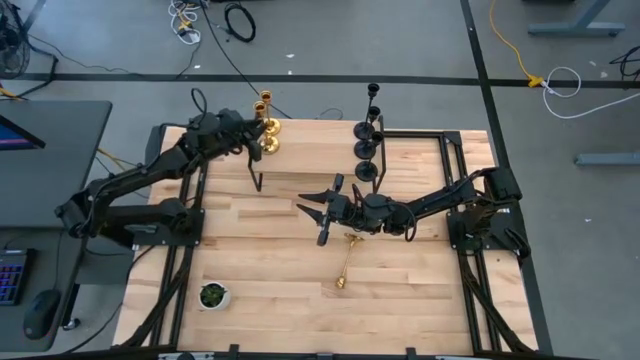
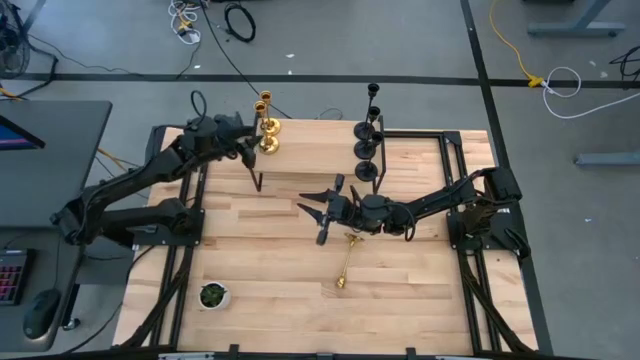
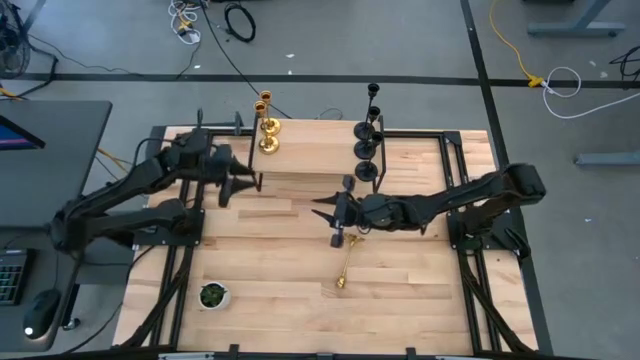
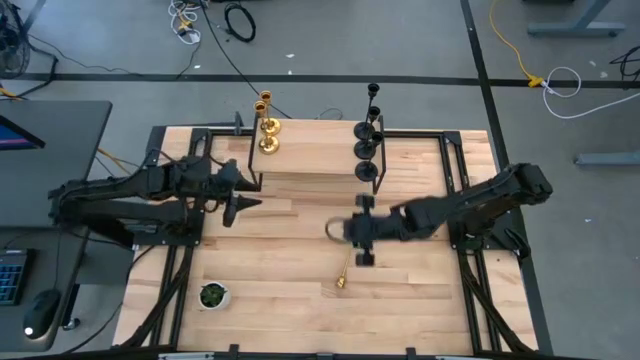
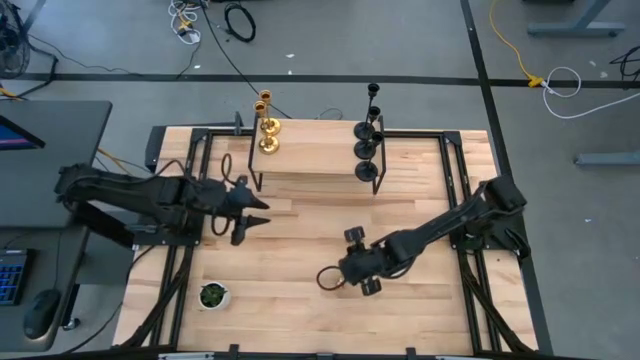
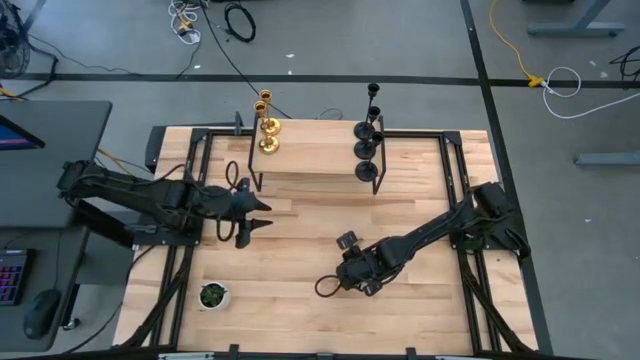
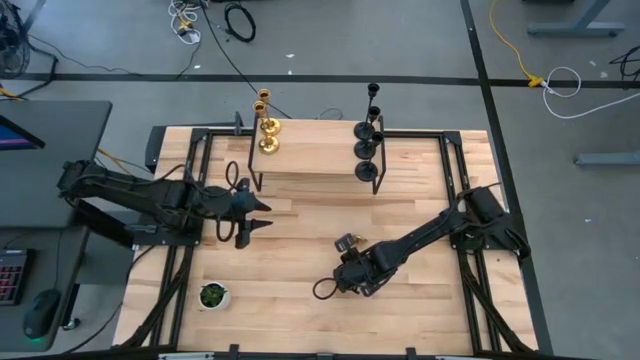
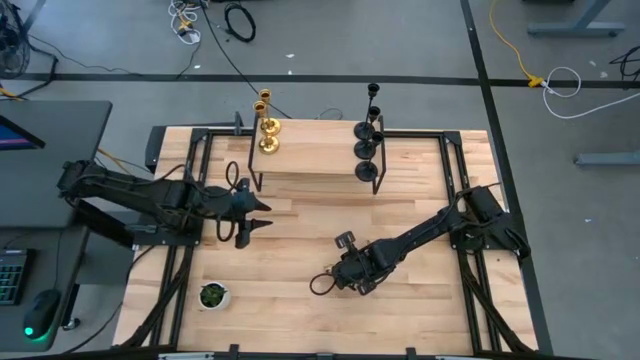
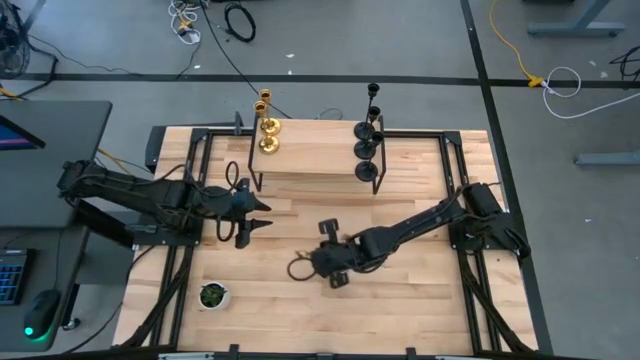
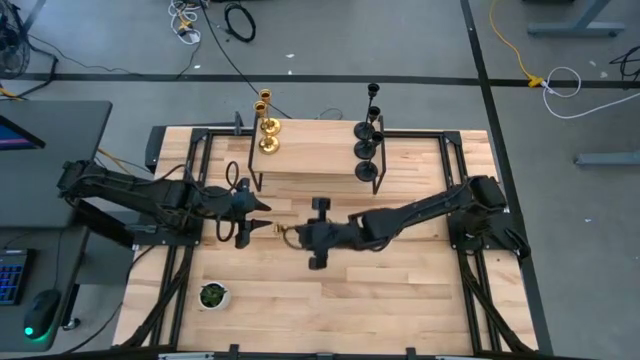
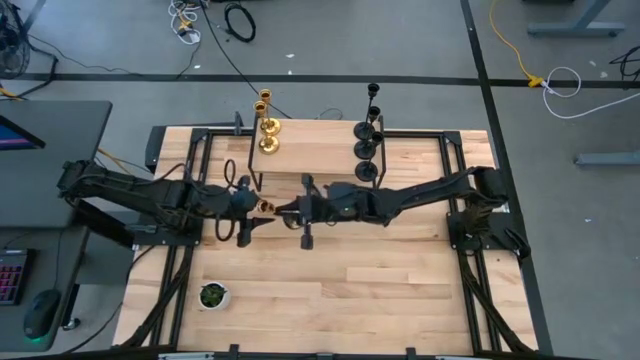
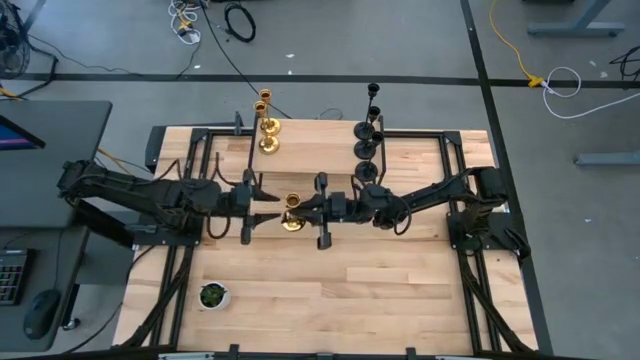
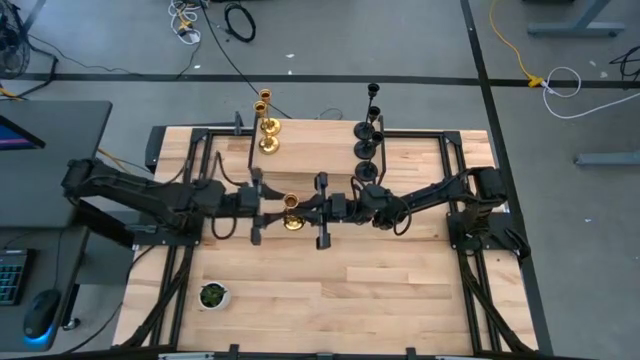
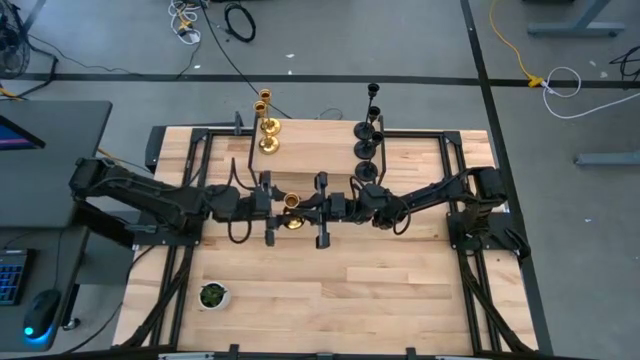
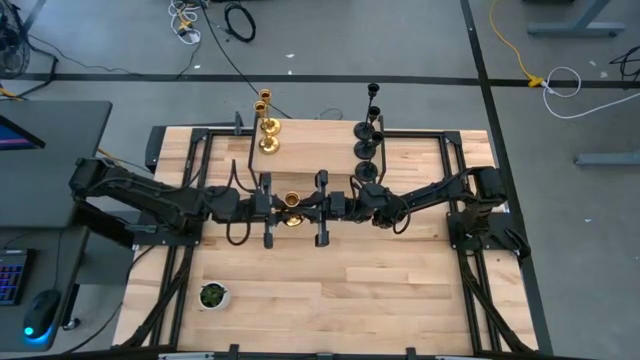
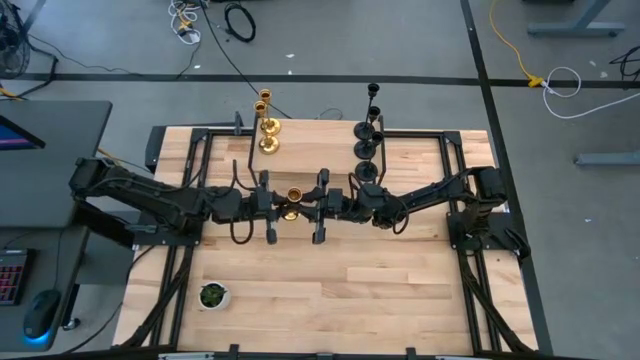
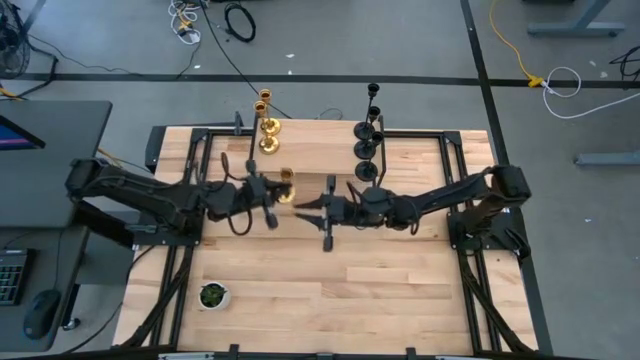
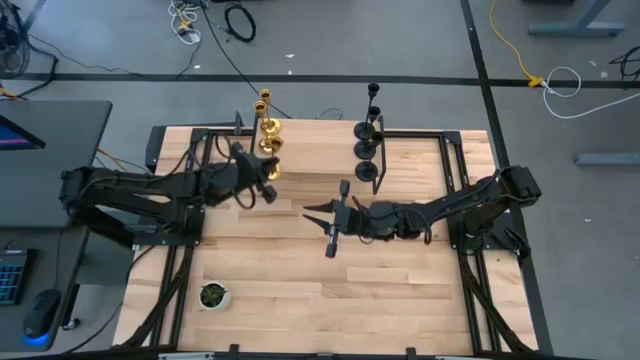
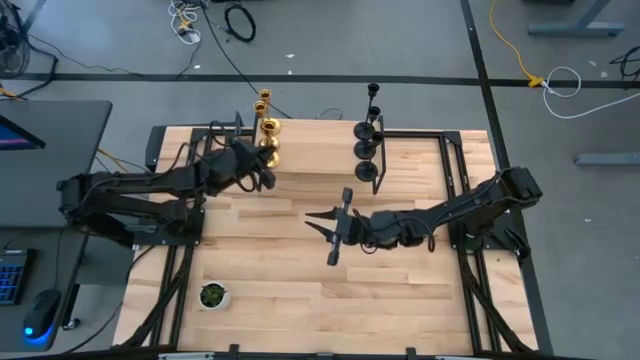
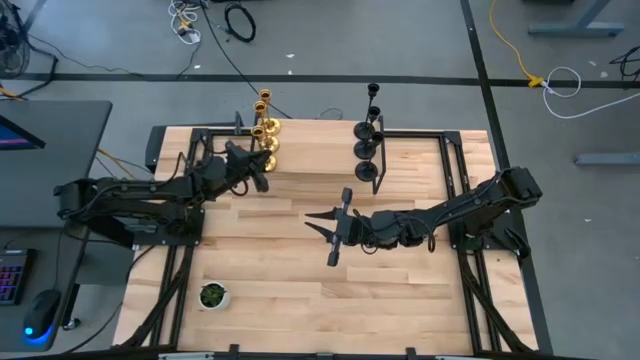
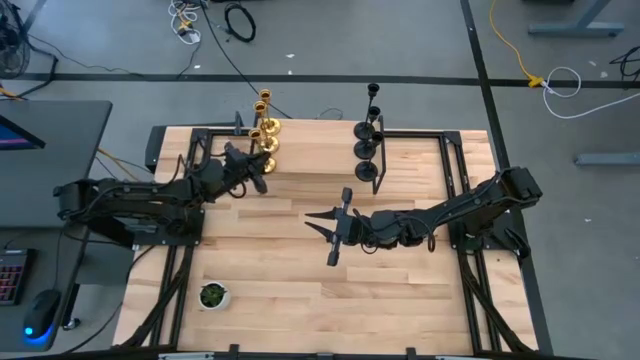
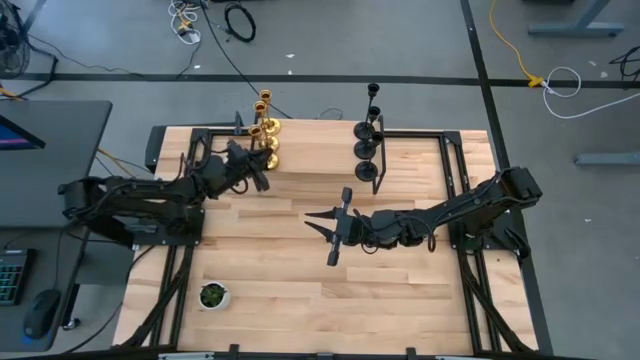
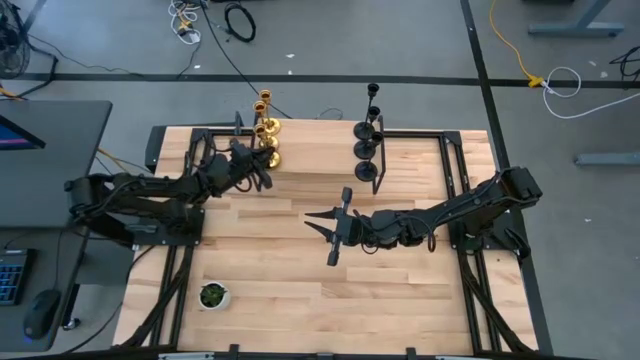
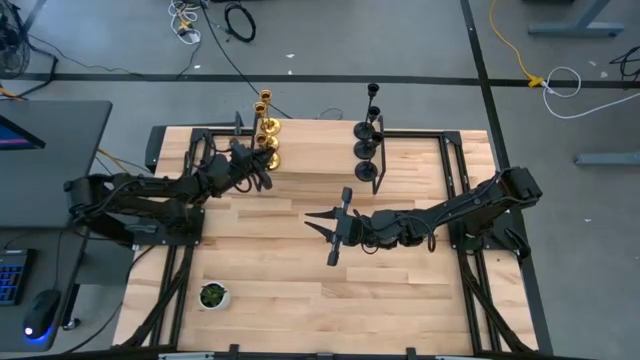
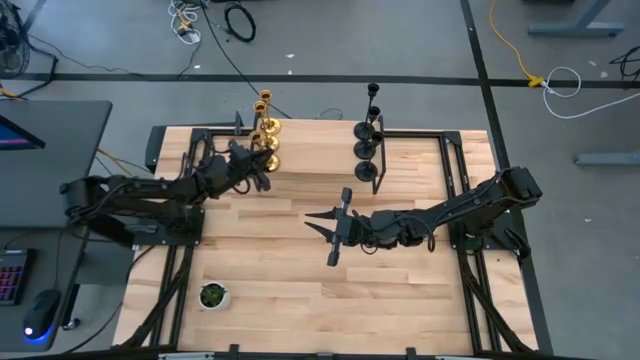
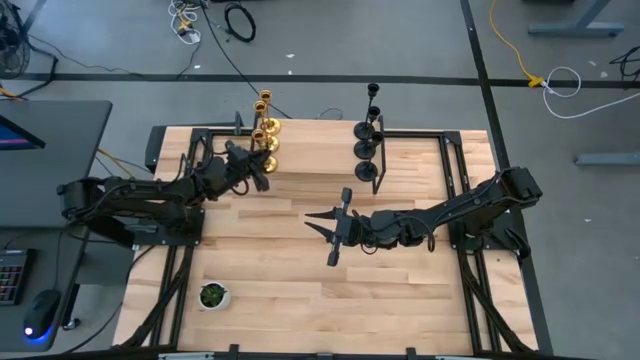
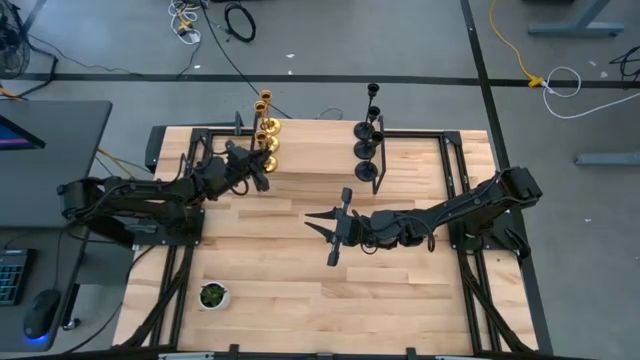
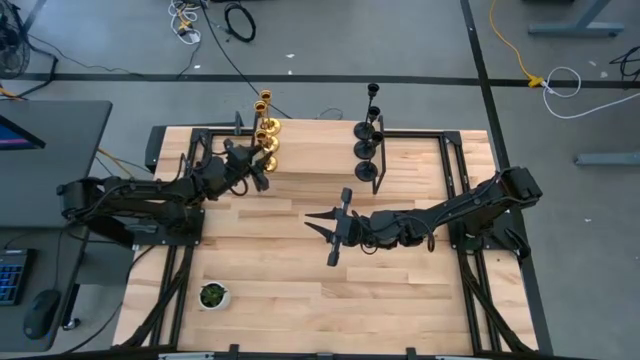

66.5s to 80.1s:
Task: Pick & Place candle stick holders
Put the gold candle holder on the shelf aligned with the other gold candle holders

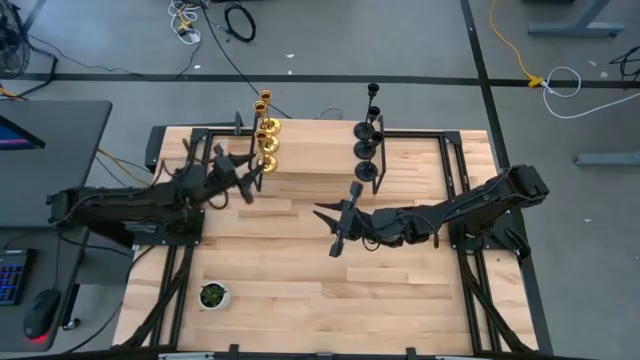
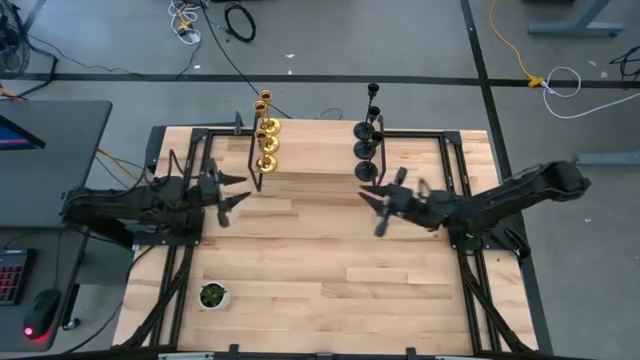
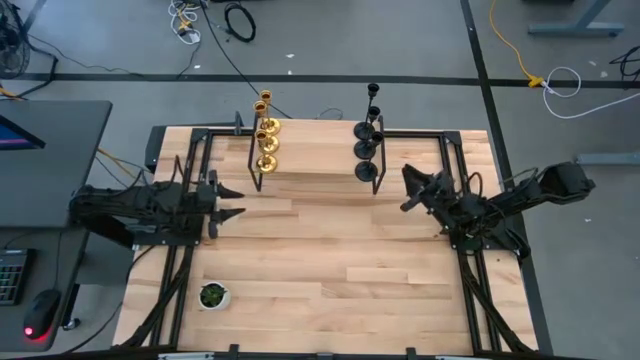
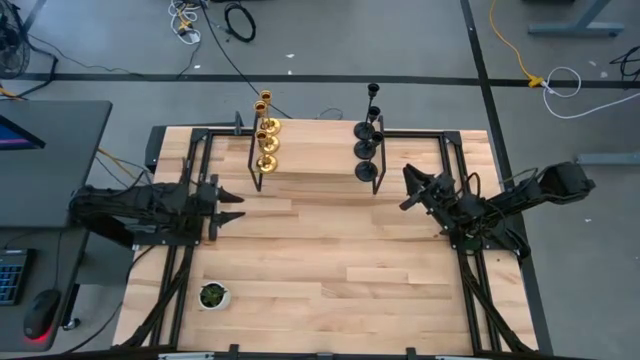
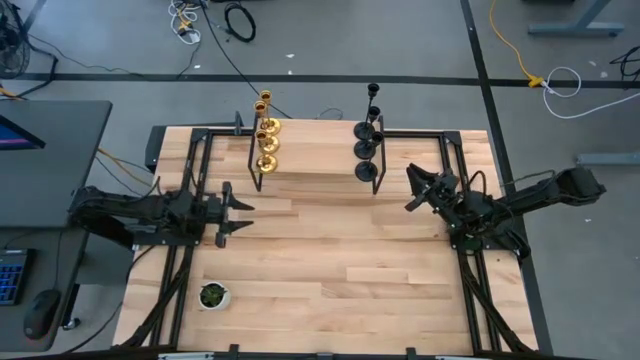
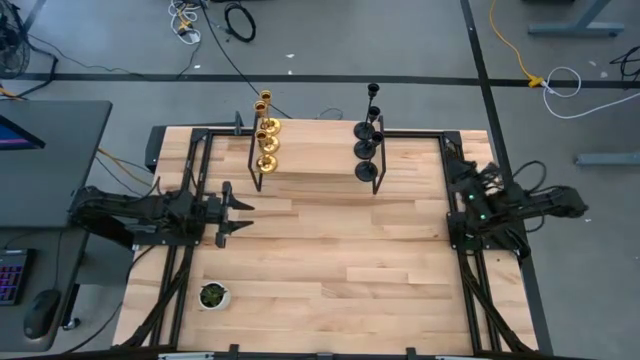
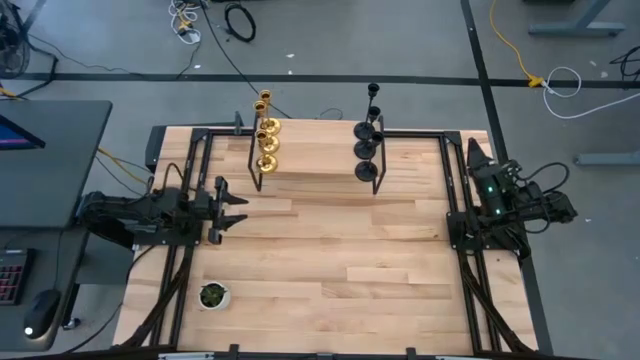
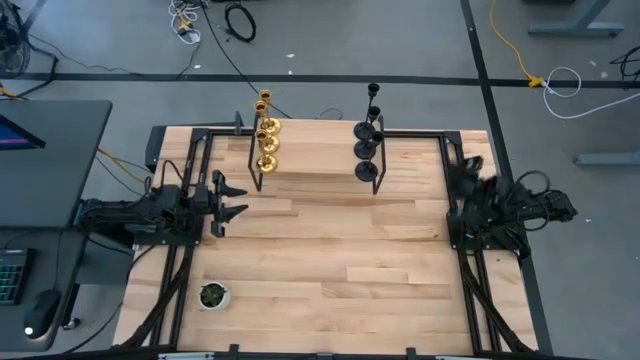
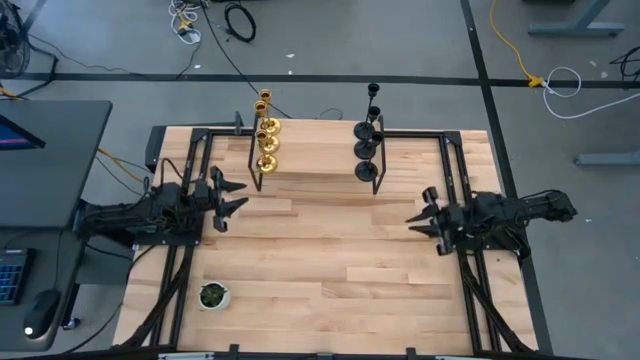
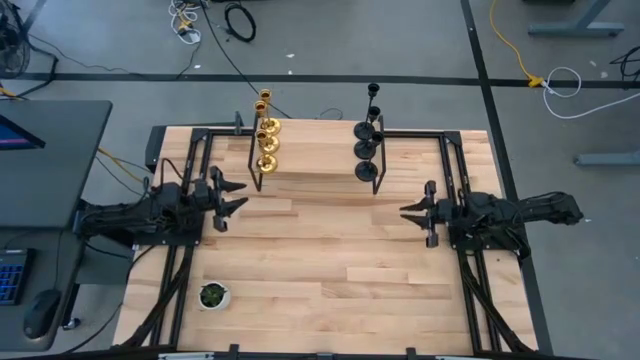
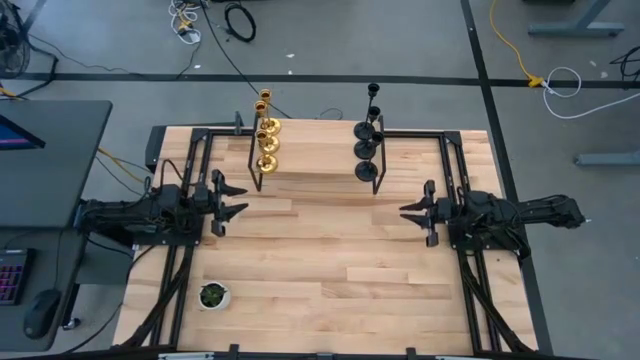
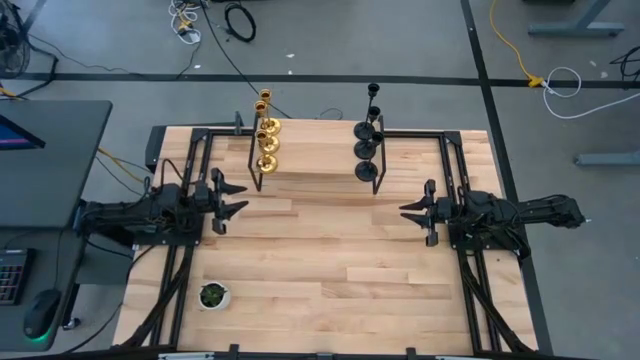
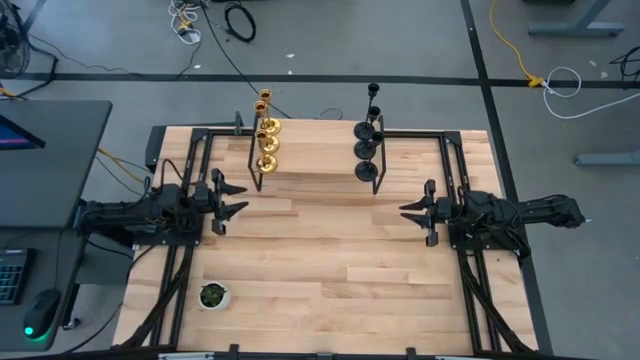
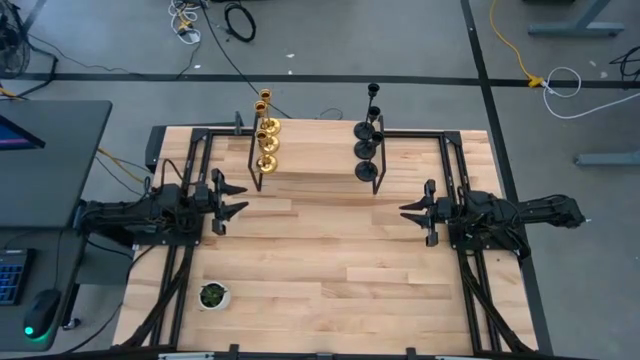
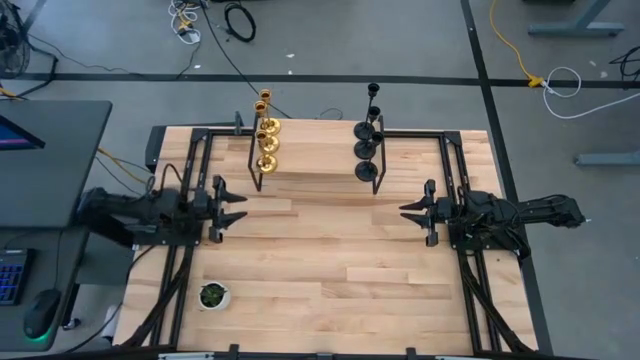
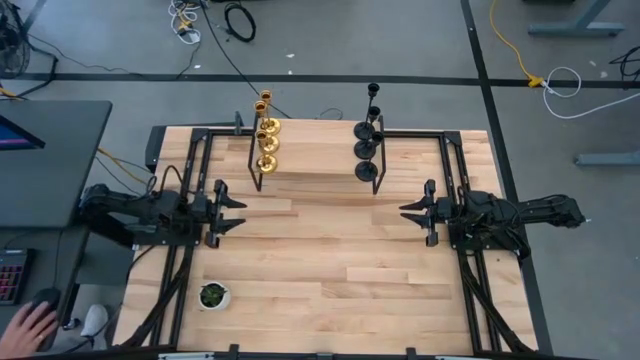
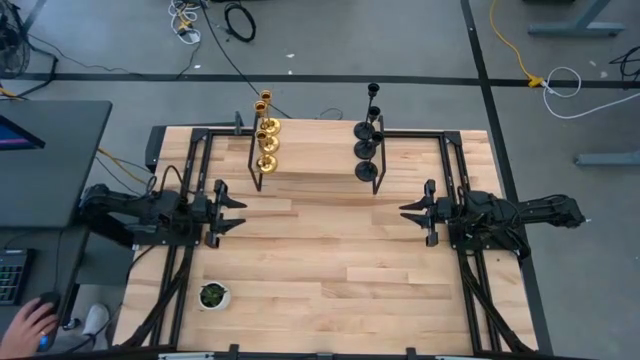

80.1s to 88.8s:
Return to Home Position
